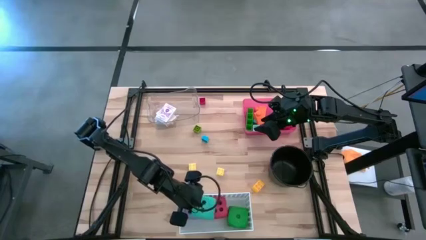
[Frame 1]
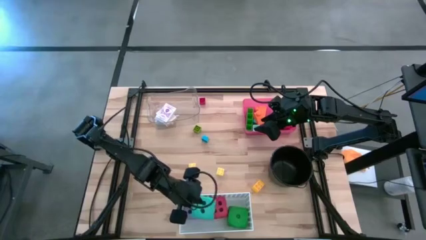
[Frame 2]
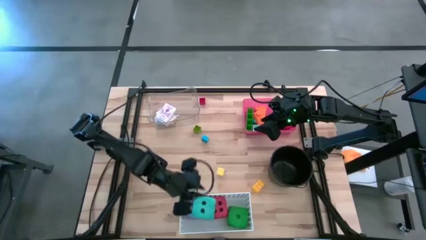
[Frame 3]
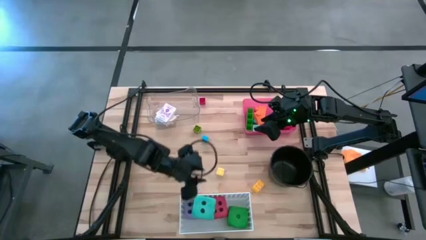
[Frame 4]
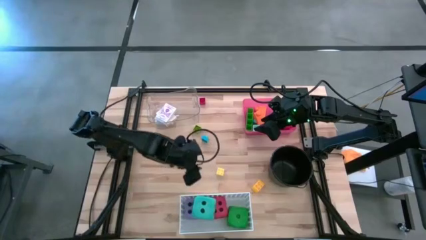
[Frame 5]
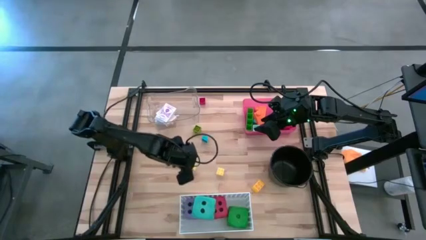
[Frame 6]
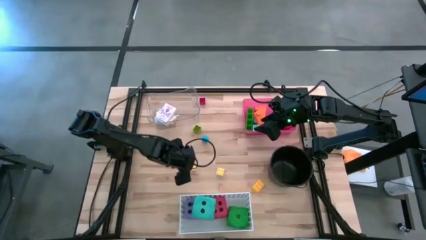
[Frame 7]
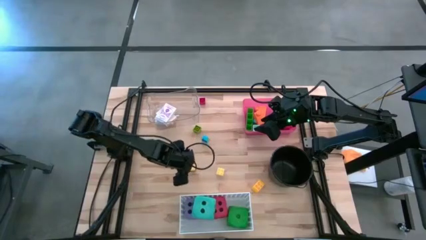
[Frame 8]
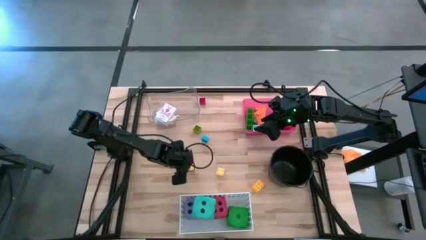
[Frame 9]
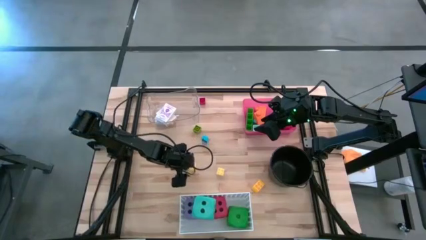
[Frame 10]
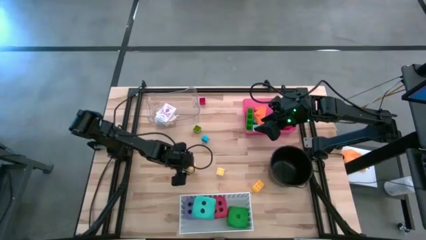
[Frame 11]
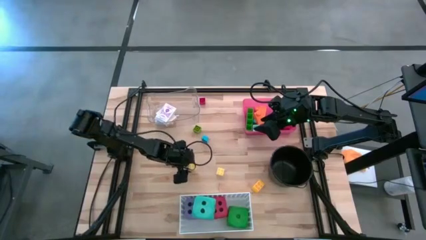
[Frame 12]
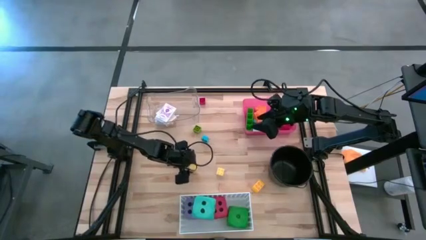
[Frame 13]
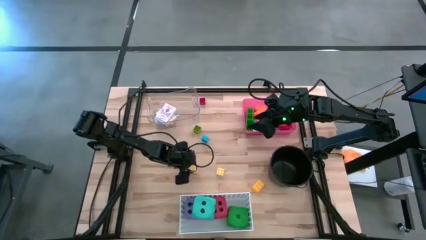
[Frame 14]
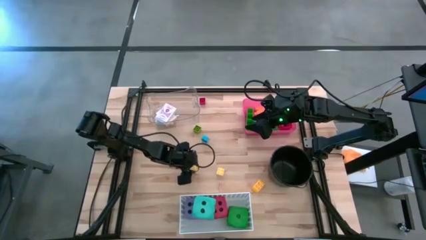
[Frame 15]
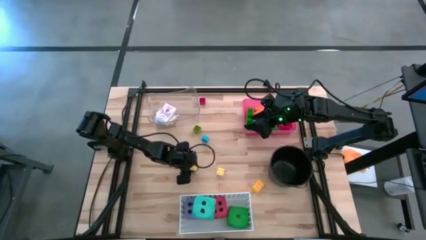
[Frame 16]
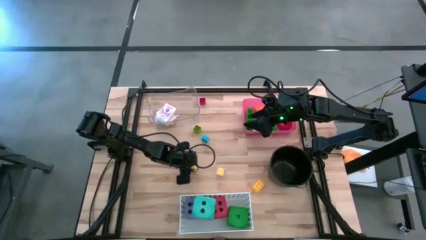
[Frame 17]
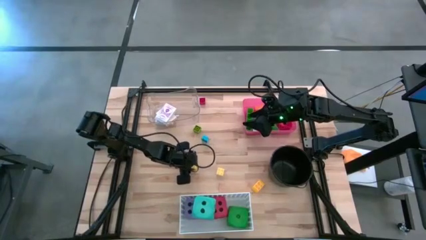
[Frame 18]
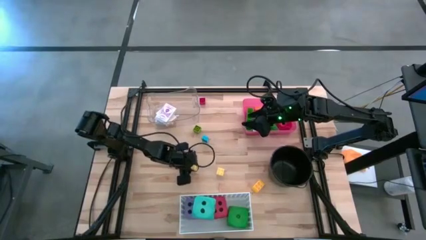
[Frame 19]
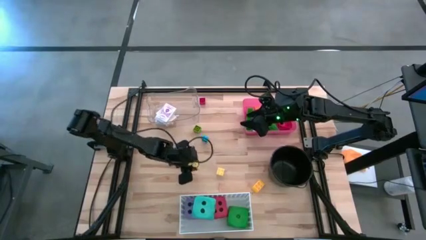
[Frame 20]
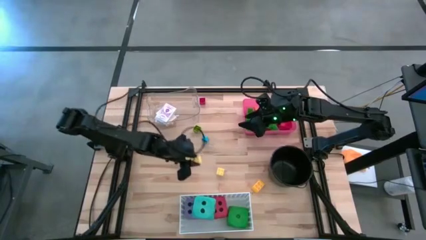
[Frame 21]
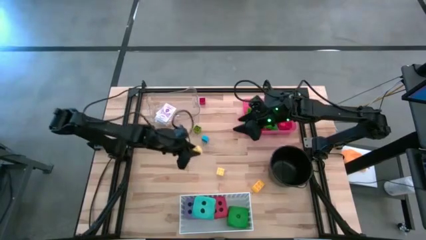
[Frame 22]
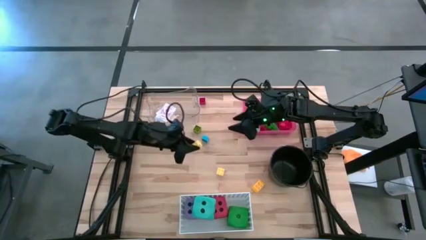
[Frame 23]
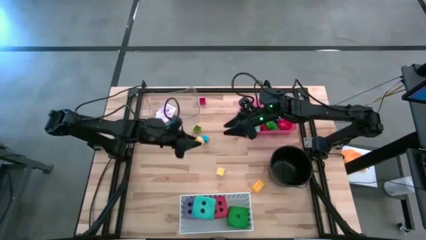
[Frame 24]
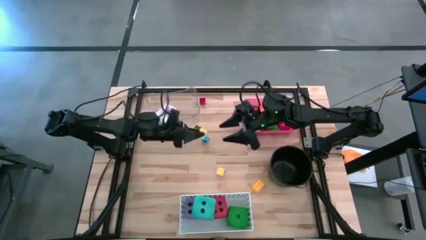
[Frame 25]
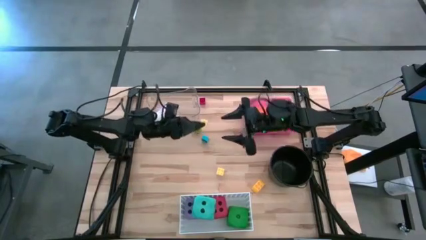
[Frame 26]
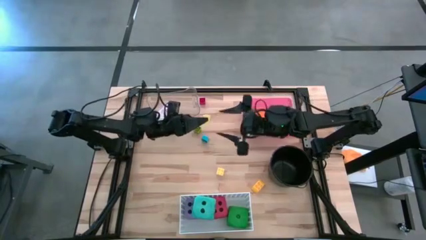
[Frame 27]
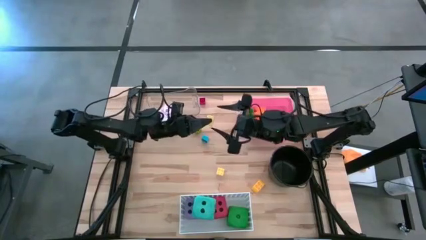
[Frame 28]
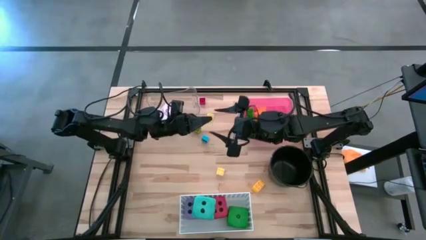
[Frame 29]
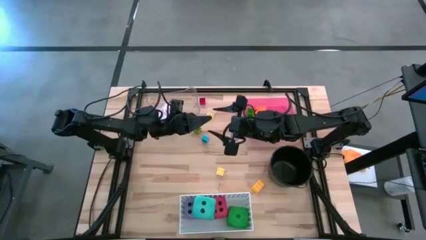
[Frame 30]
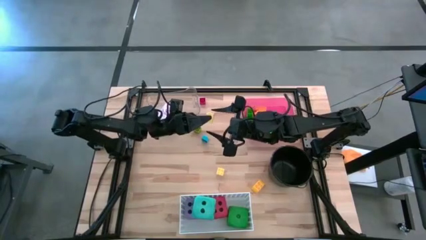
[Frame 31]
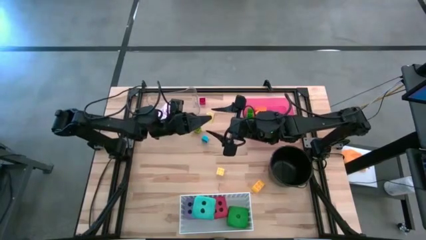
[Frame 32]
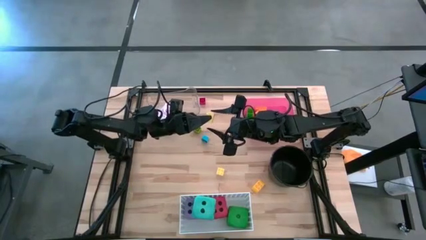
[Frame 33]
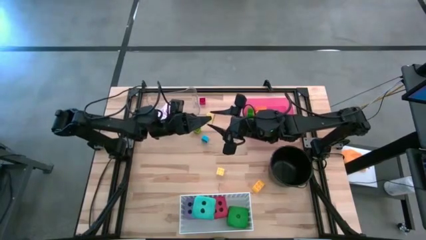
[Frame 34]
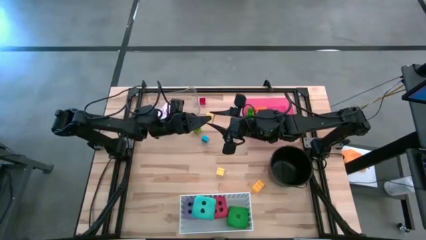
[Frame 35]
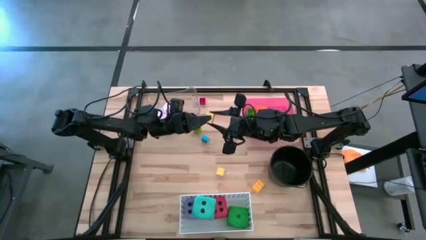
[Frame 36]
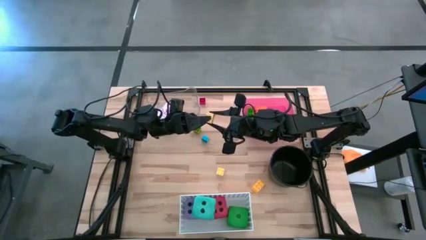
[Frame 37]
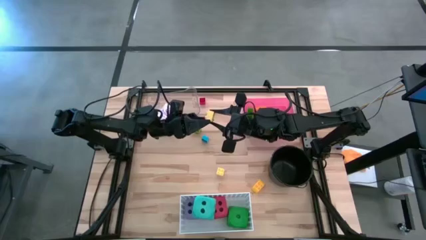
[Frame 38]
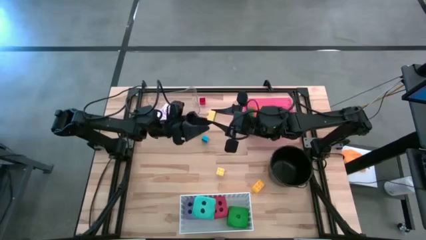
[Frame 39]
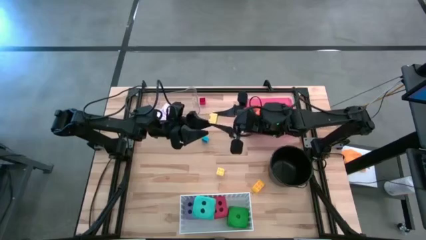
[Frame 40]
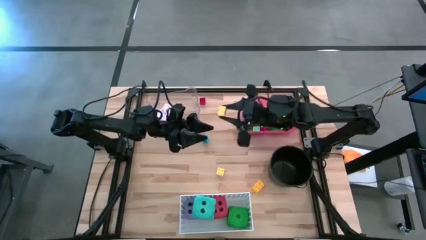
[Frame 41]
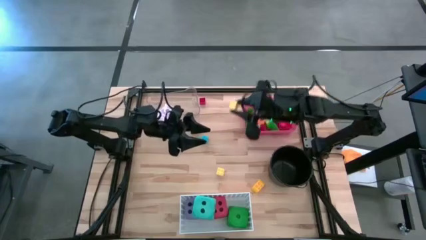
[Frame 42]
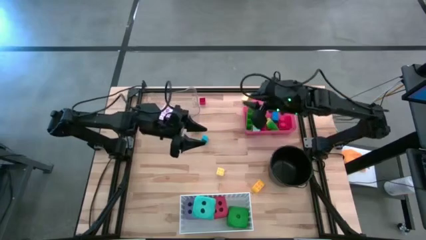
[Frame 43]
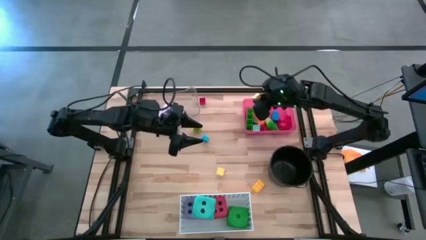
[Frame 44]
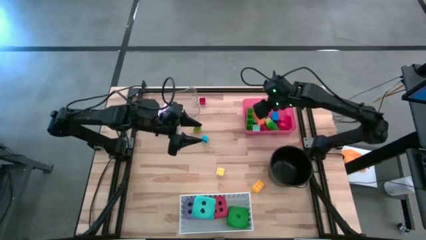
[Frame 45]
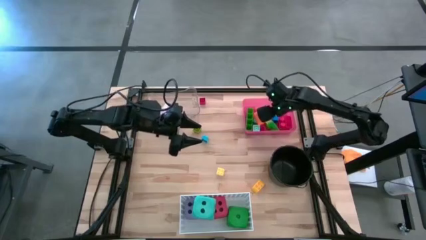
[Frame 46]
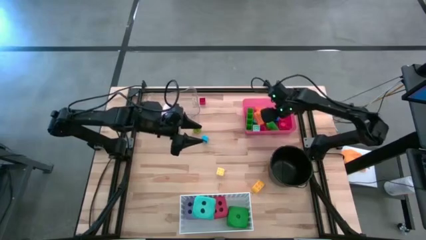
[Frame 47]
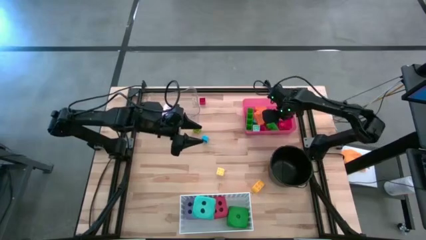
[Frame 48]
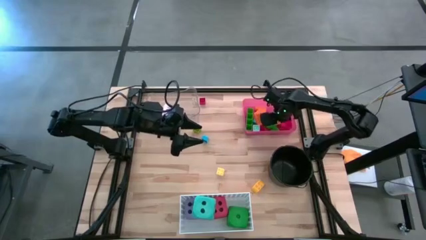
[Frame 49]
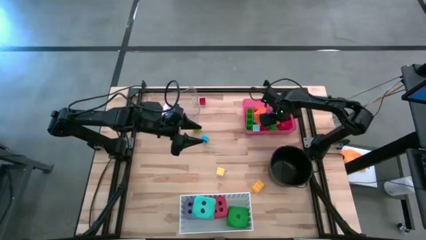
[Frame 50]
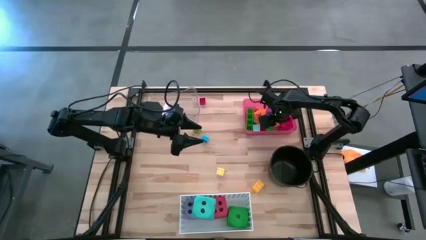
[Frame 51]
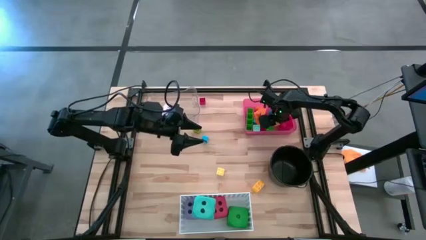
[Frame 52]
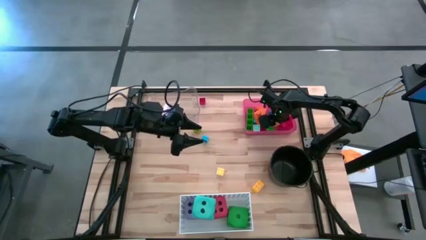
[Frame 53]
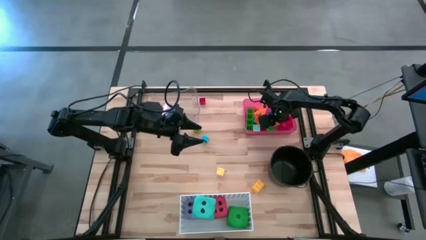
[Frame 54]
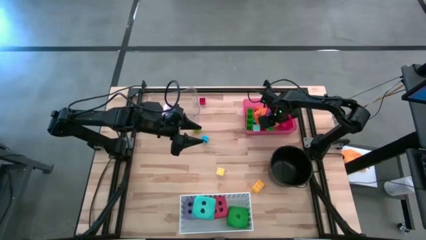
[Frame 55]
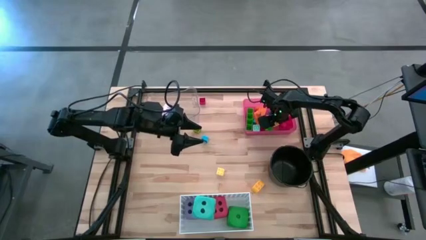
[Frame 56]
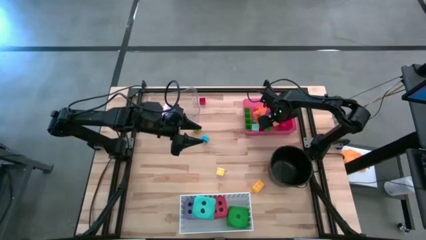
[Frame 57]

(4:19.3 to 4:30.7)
Task: Pick & Place Toys
Put the yellow game piece into the red bin

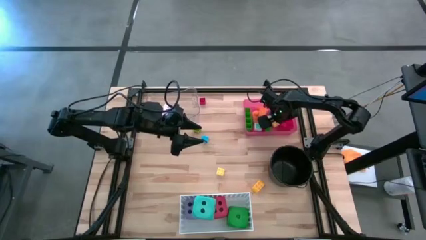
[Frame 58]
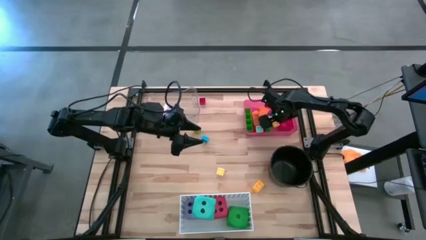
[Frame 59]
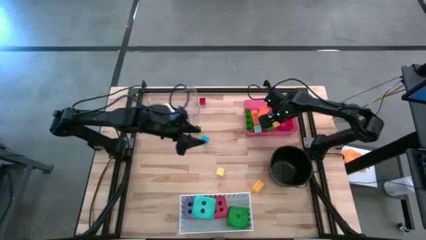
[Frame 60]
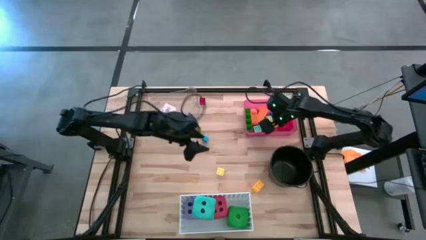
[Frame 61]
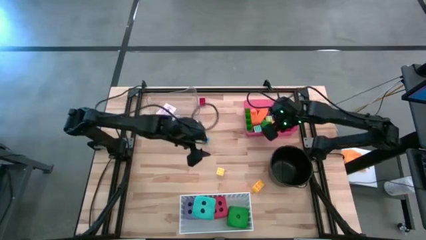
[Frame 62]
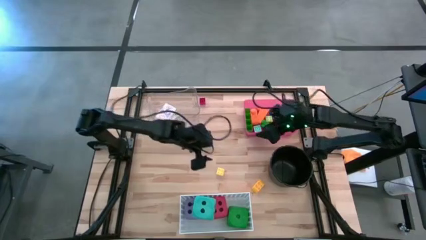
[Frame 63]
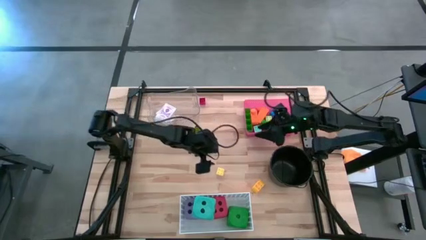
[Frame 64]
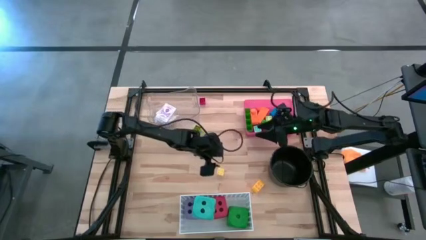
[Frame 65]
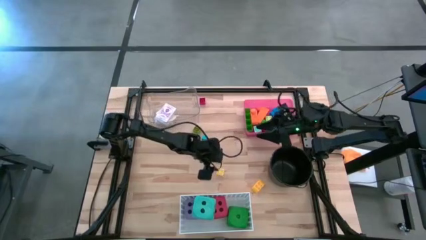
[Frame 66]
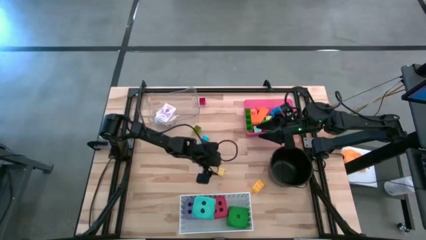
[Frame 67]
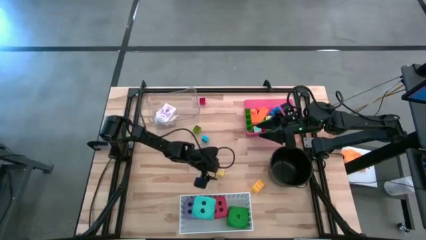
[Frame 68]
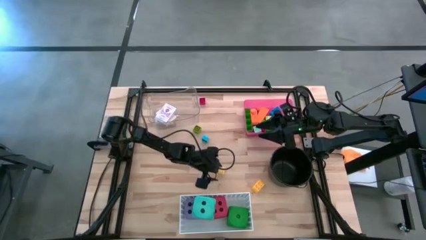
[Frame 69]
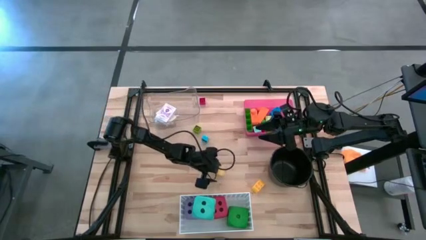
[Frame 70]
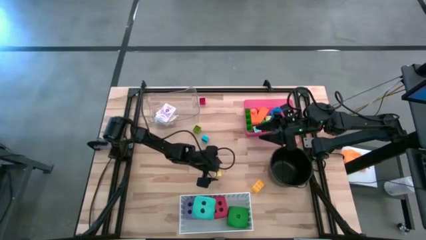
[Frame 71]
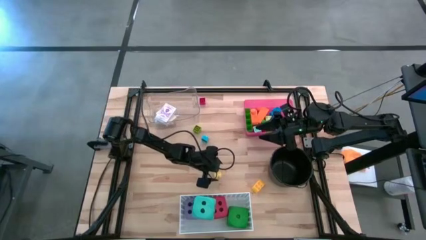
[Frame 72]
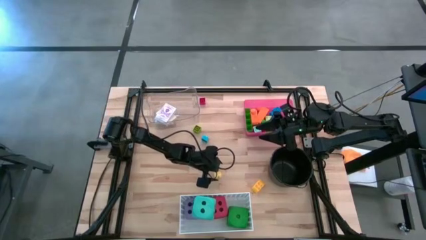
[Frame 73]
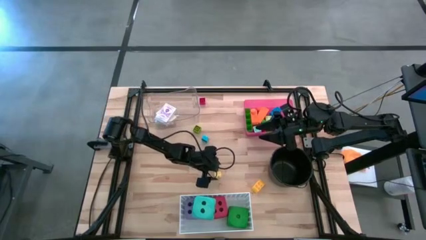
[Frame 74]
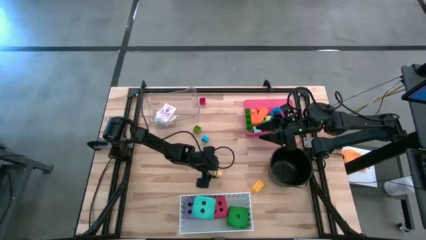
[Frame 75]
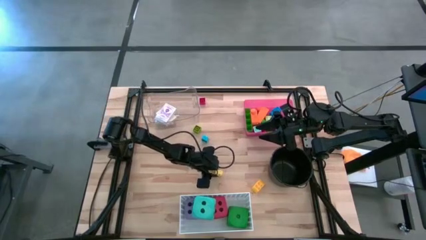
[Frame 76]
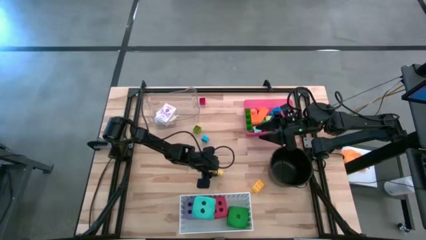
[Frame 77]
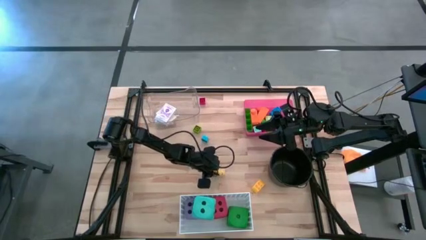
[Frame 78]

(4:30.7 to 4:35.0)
Put the yellow game piece into the red bin

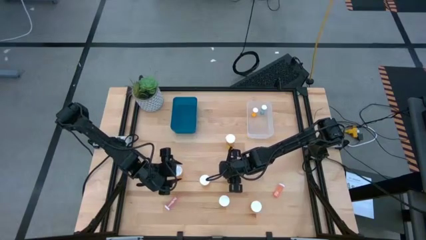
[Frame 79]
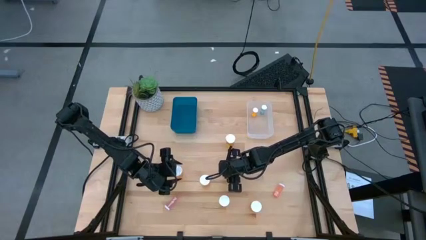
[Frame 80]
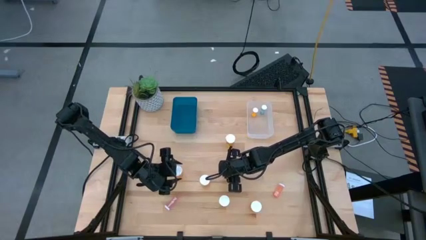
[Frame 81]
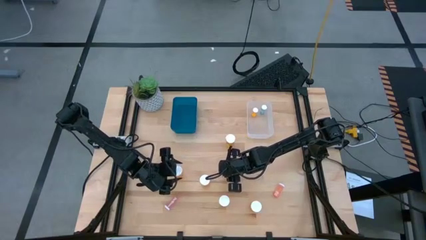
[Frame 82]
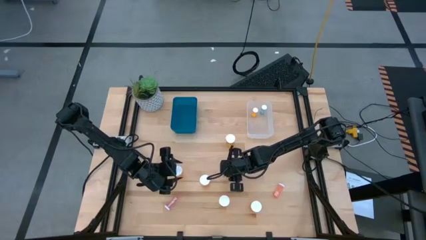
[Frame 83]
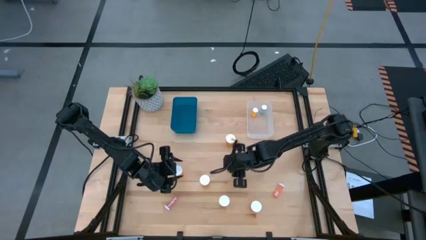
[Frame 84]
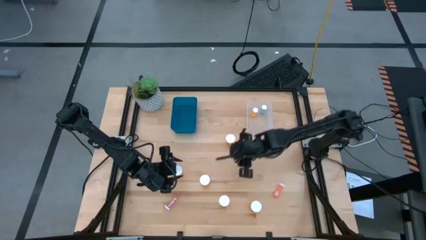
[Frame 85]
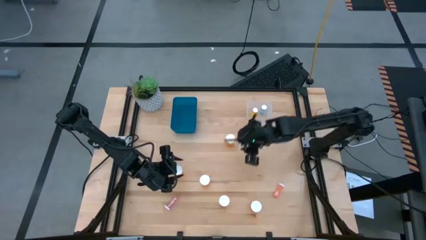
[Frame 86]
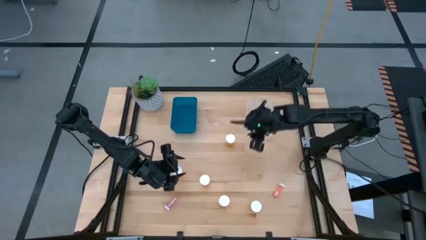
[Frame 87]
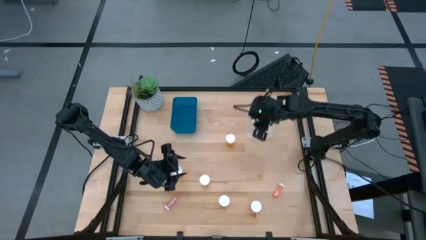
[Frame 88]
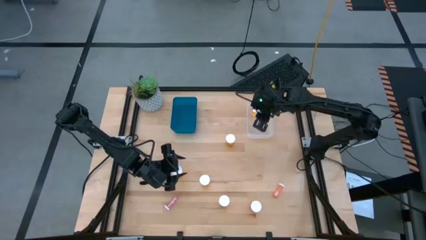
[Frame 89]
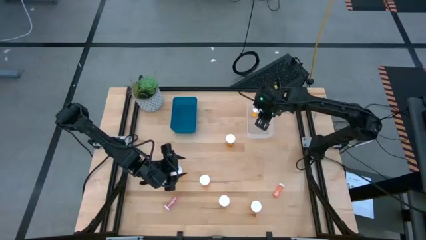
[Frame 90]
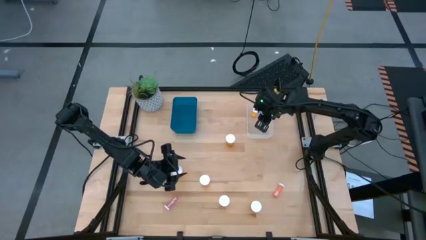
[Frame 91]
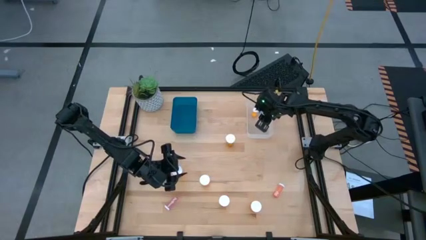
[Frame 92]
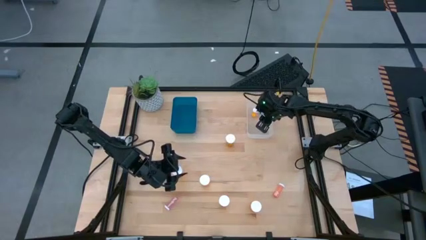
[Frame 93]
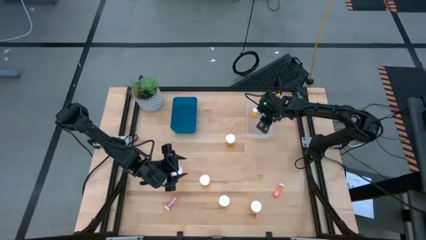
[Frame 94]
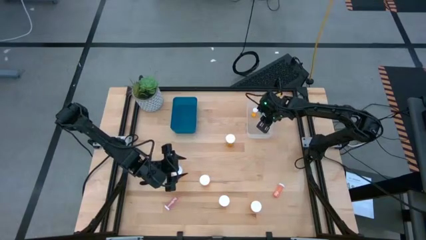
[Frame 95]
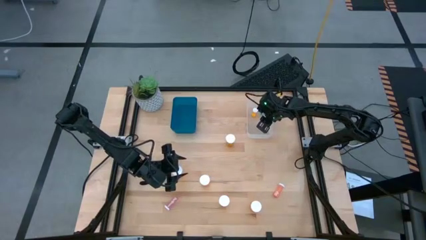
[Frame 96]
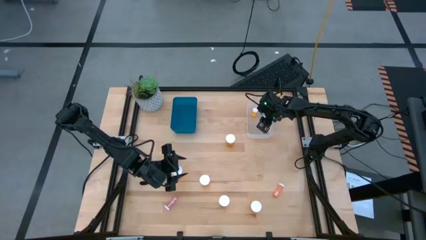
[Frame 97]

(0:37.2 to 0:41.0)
Task: Pick and place medicine bottles into bin by pill shape (circle, oval)
Put the small yellow pill bottle into the transparent bin
